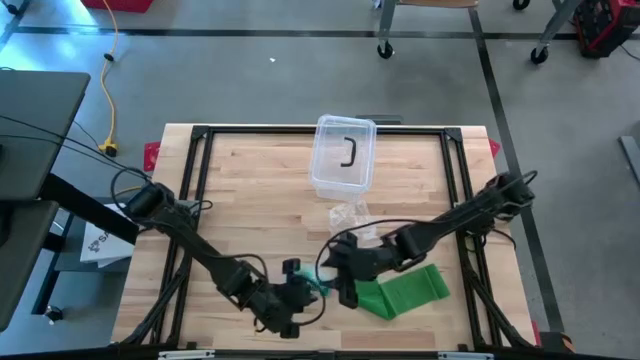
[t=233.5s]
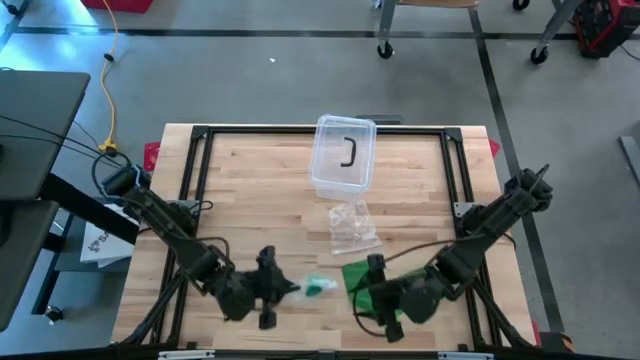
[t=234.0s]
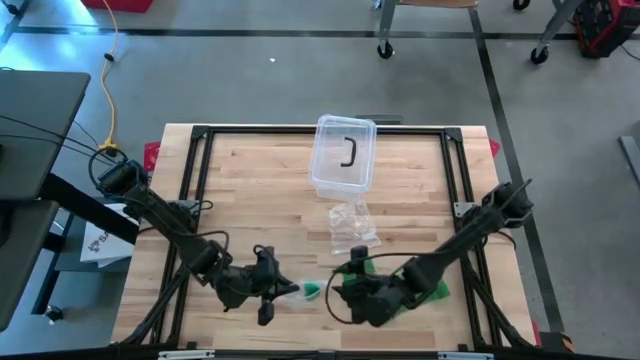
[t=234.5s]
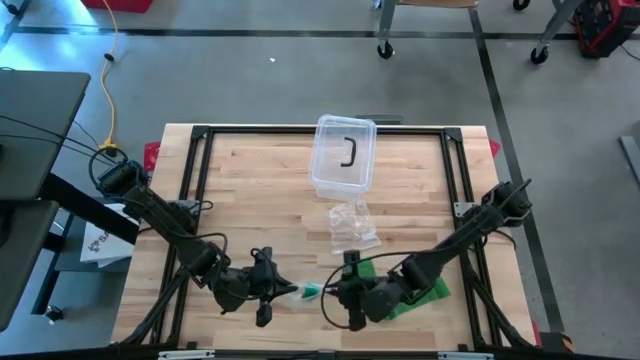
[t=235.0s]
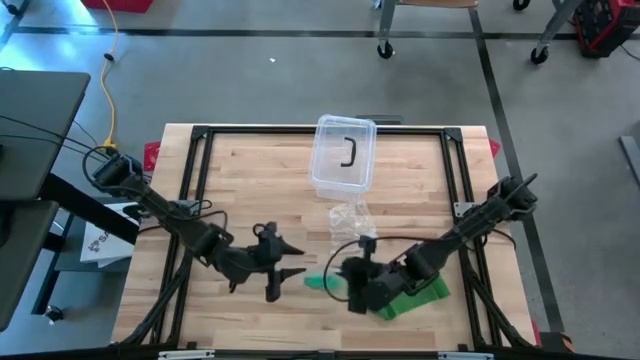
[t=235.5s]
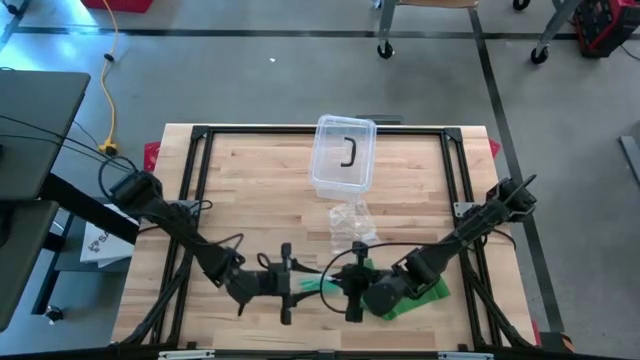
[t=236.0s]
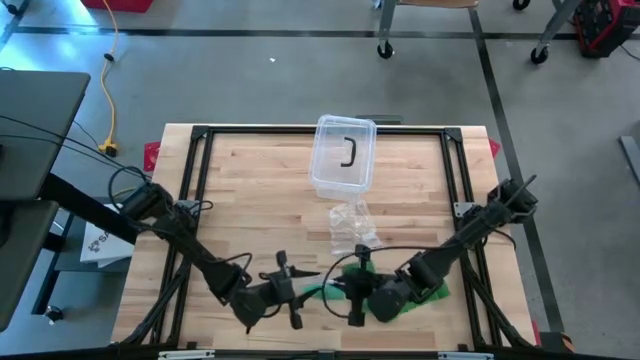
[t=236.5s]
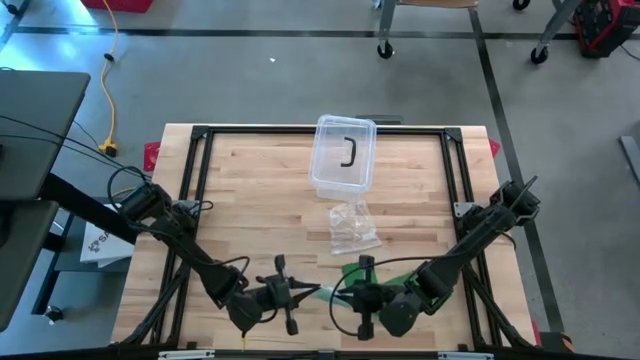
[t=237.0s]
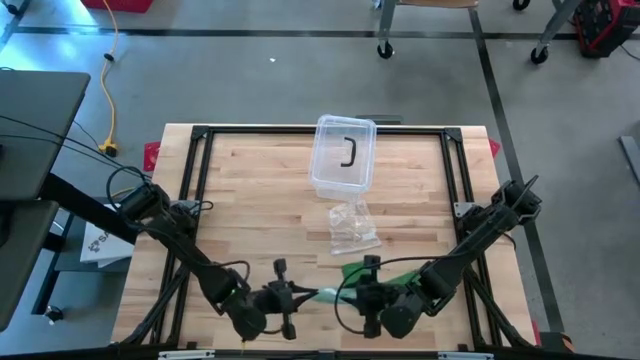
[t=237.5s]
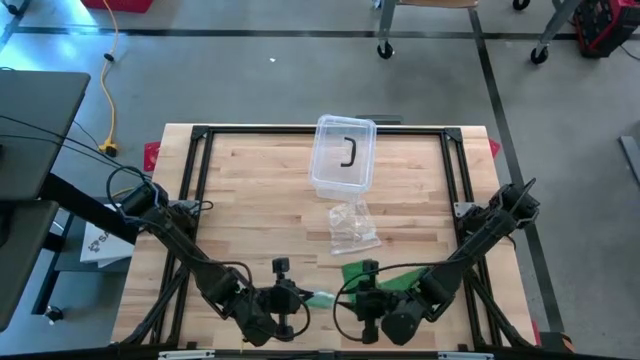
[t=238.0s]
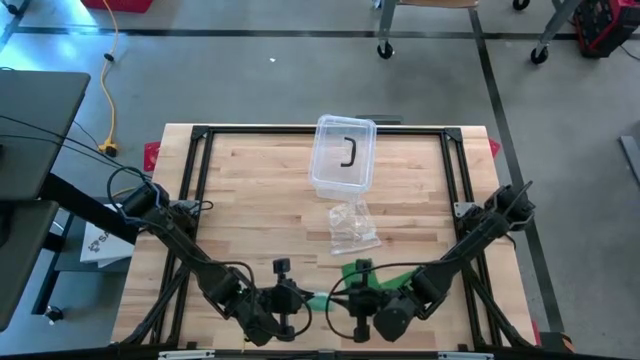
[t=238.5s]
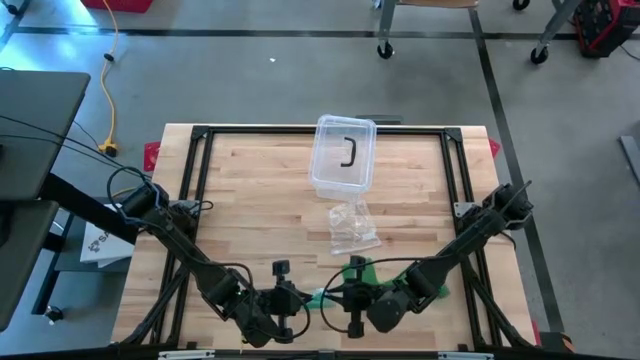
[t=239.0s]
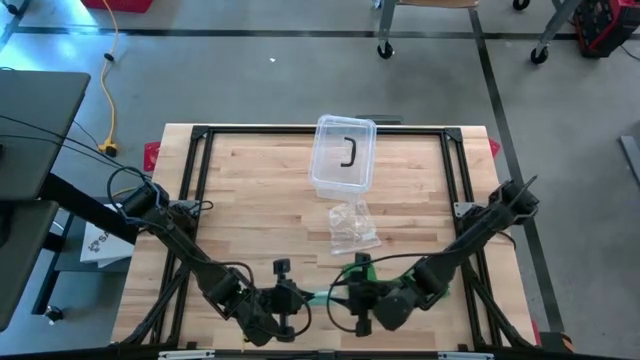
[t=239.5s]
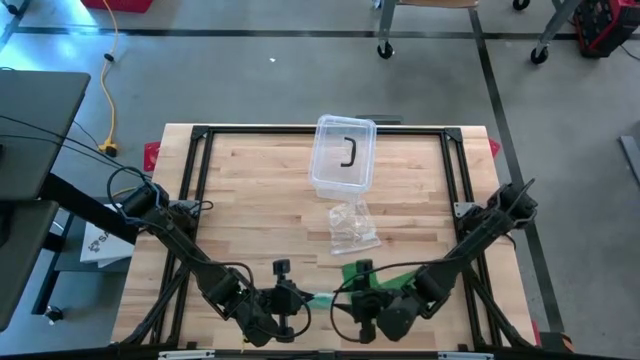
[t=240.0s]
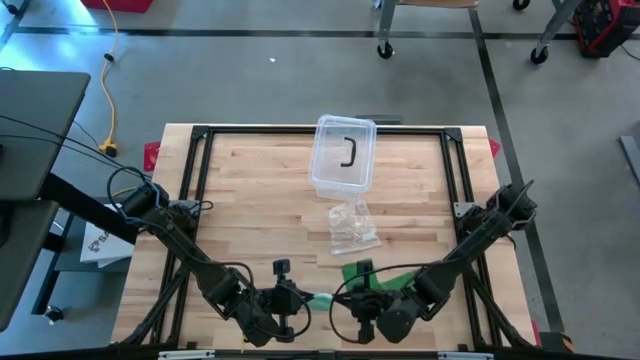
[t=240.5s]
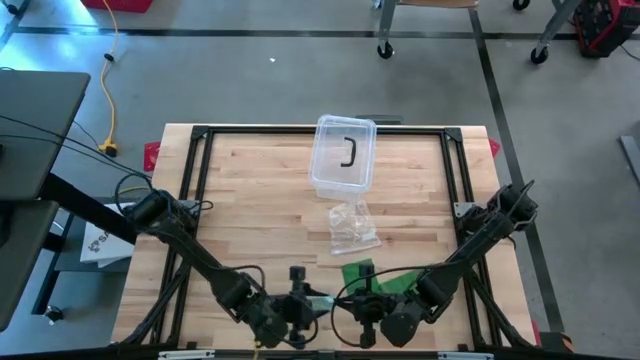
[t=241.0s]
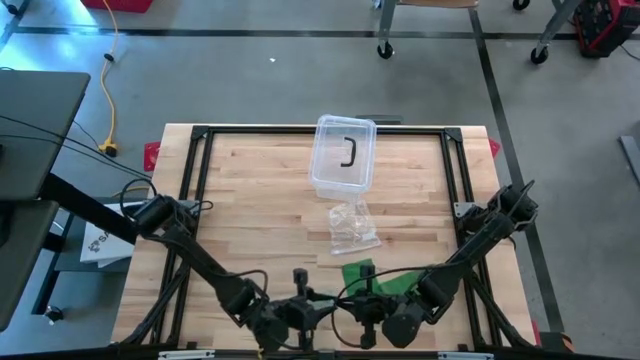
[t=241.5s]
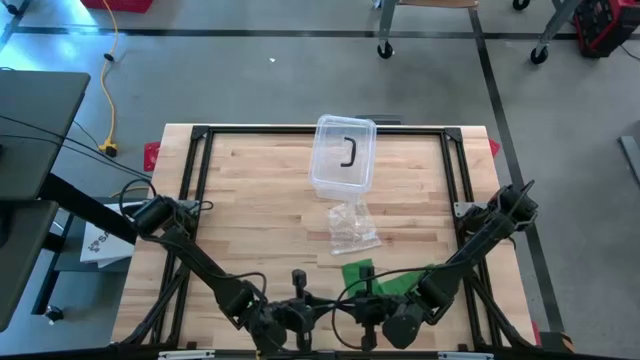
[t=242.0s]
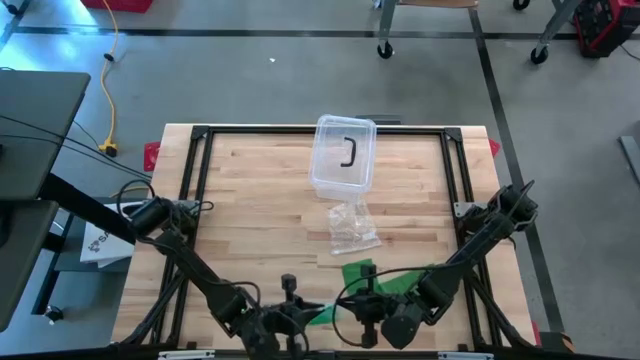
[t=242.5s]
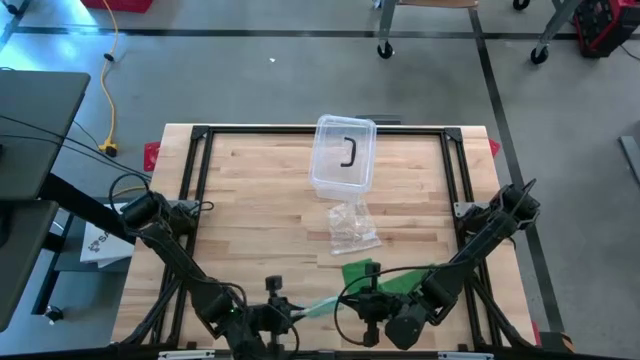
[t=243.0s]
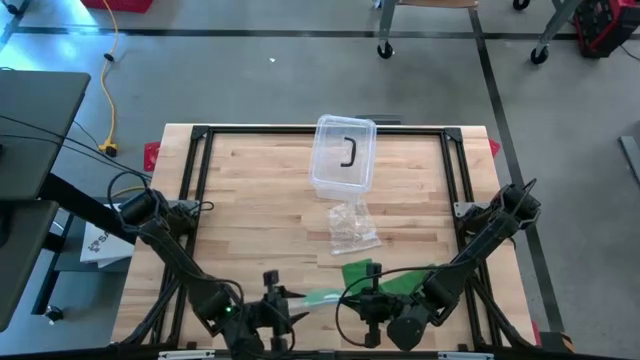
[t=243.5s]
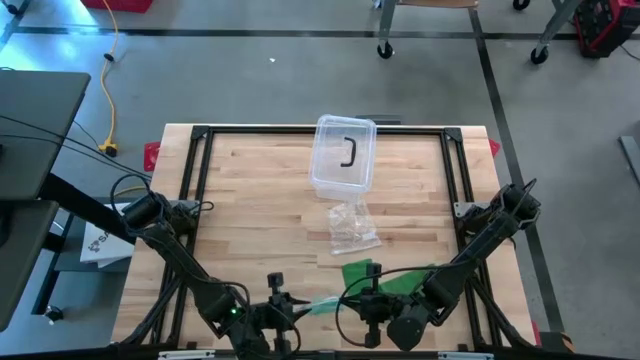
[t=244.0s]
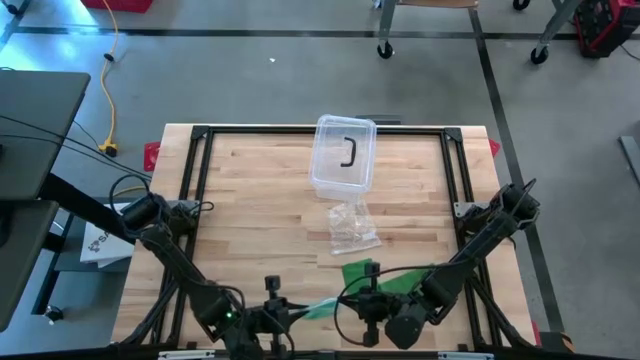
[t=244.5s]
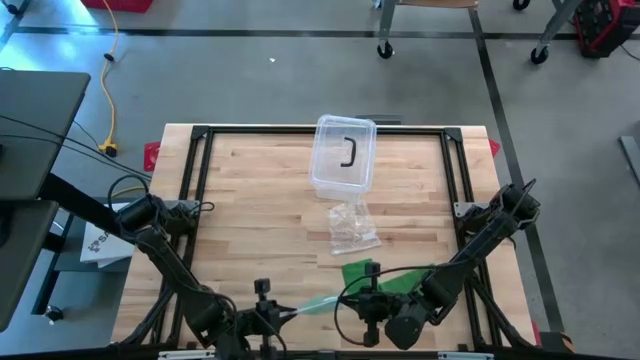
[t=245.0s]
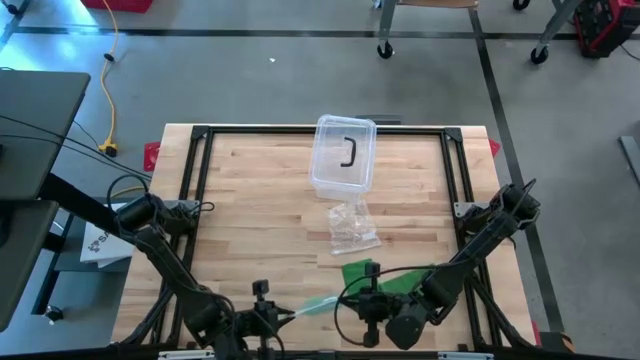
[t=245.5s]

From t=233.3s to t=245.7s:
Task: Roll bandage
Close the transparent zip bag

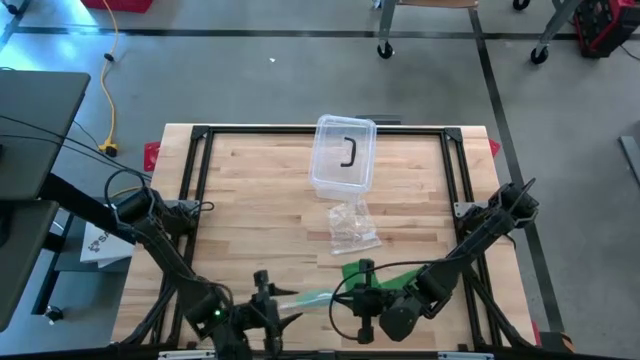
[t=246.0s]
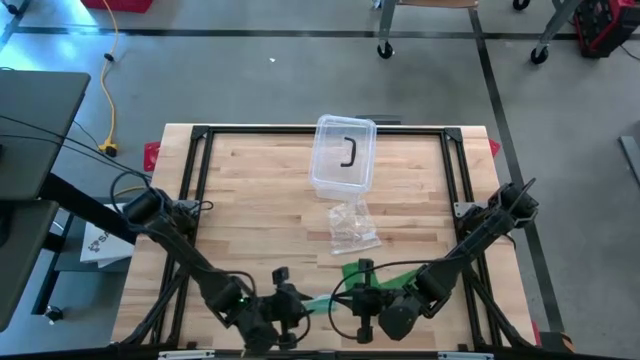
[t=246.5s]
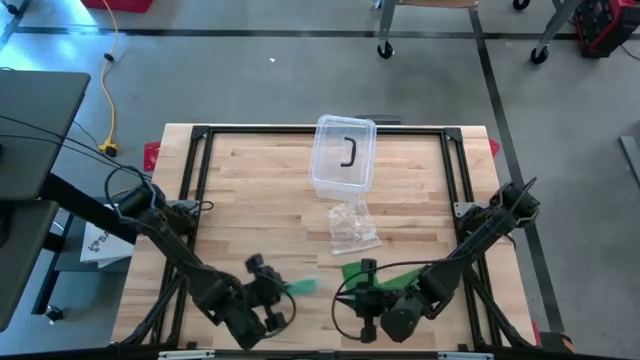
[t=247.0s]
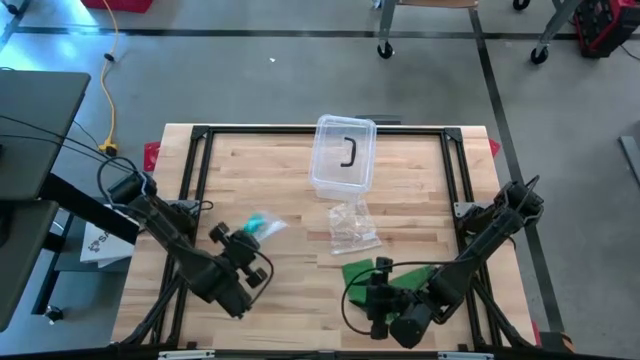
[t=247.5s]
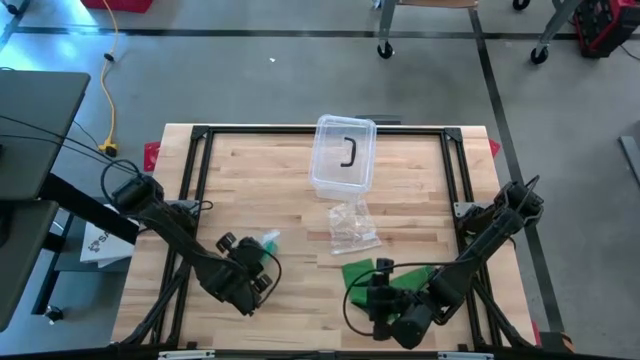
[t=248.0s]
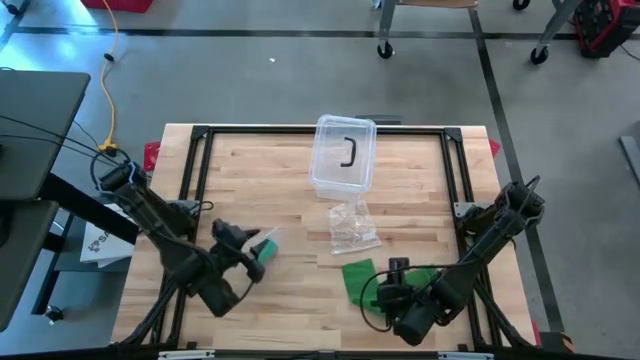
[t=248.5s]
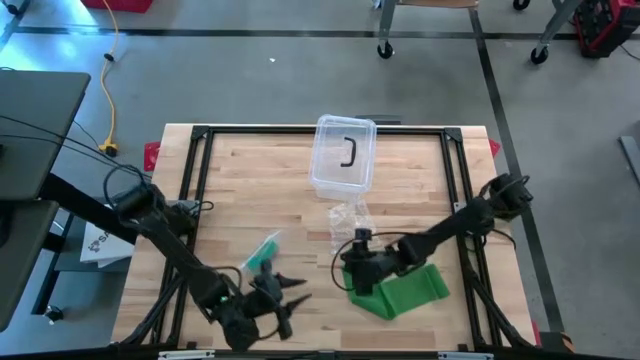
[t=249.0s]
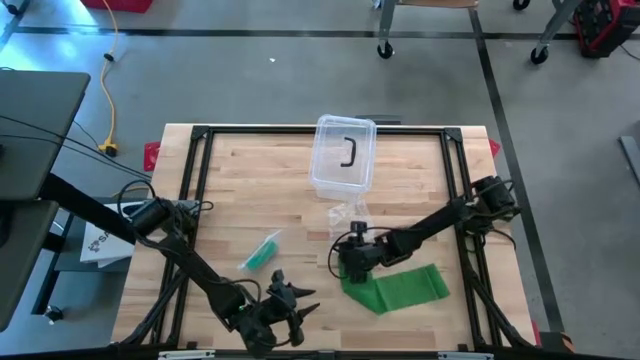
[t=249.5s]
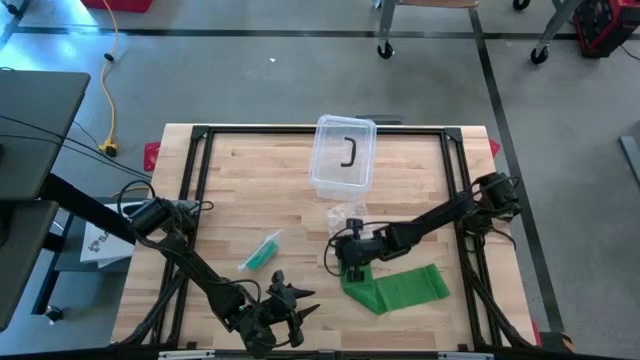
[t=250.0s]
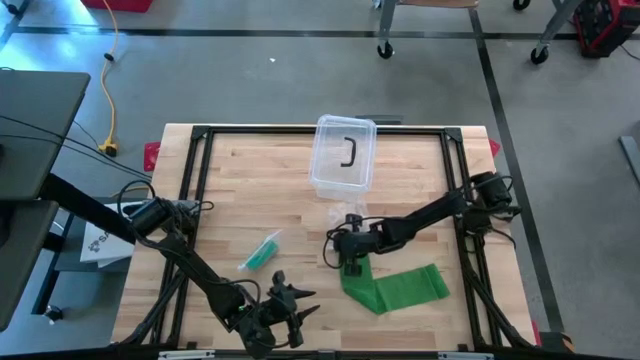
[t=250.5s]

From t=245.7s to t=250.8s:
Open the transparent zip bag
